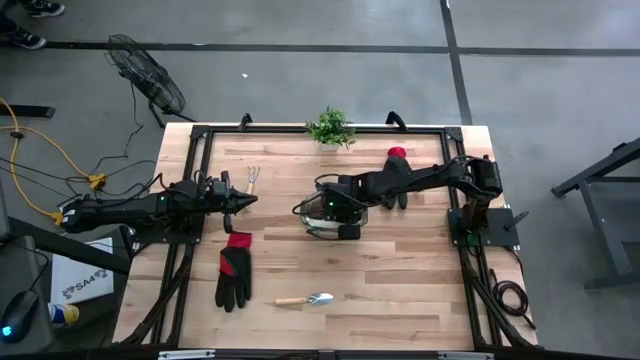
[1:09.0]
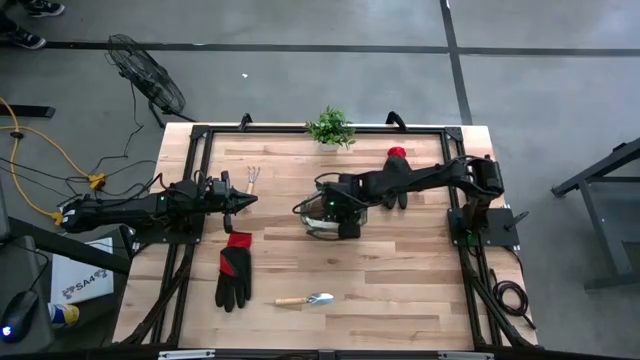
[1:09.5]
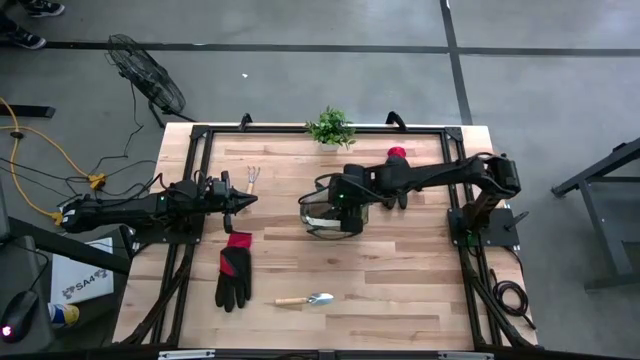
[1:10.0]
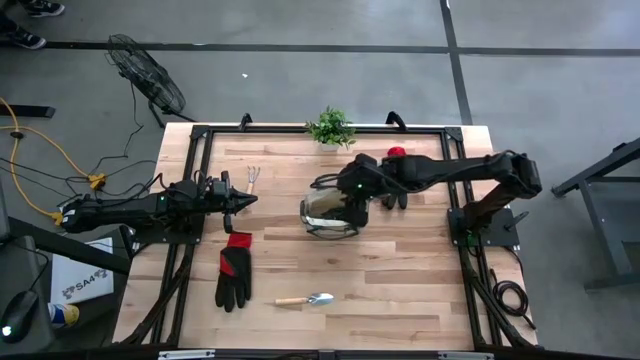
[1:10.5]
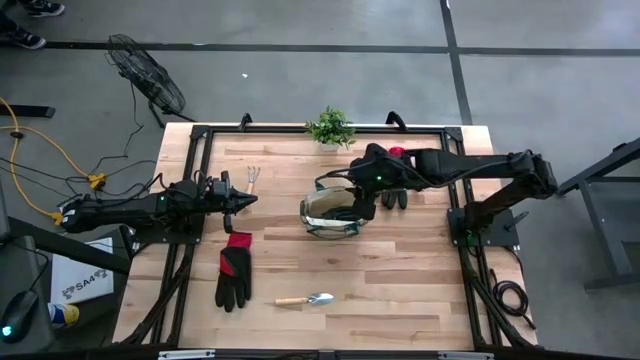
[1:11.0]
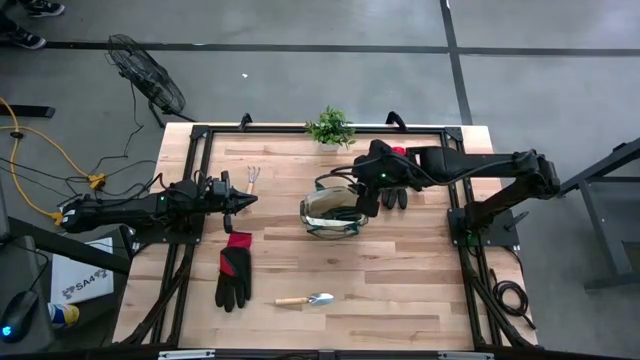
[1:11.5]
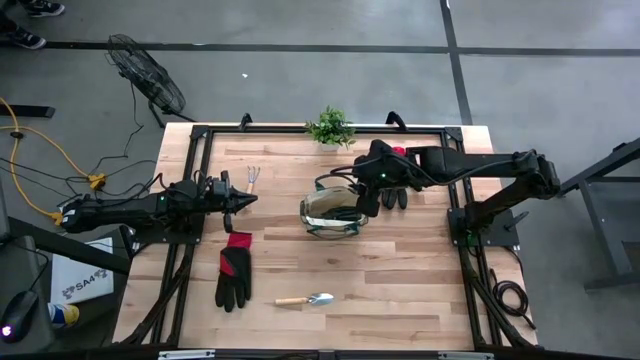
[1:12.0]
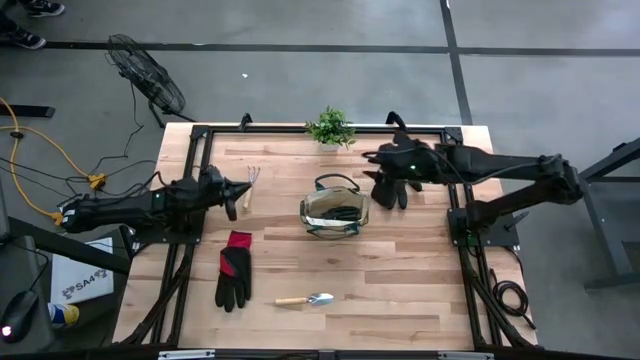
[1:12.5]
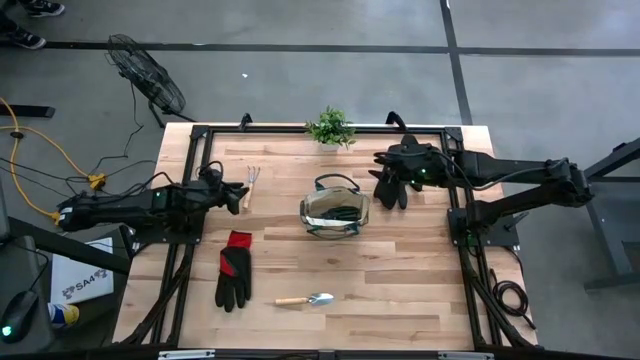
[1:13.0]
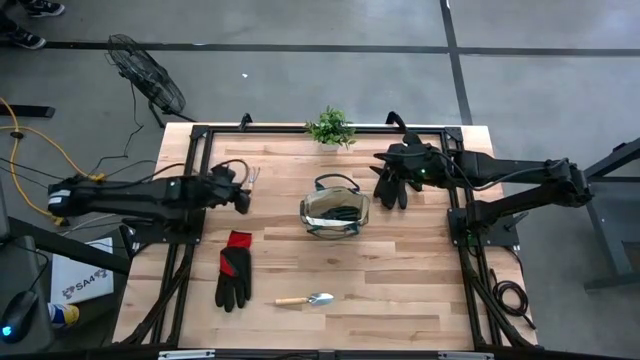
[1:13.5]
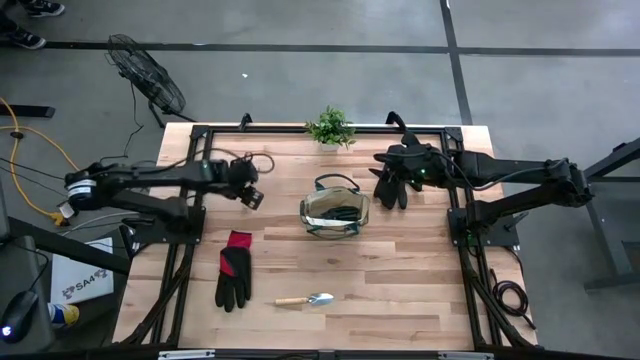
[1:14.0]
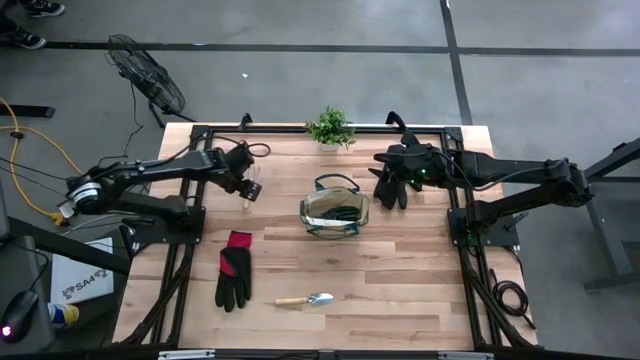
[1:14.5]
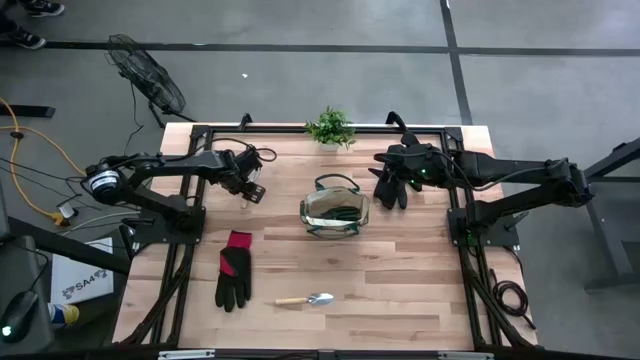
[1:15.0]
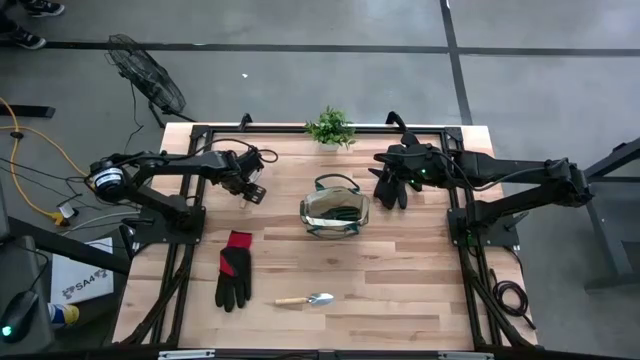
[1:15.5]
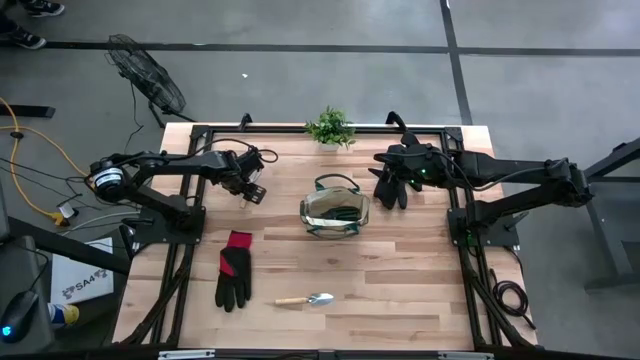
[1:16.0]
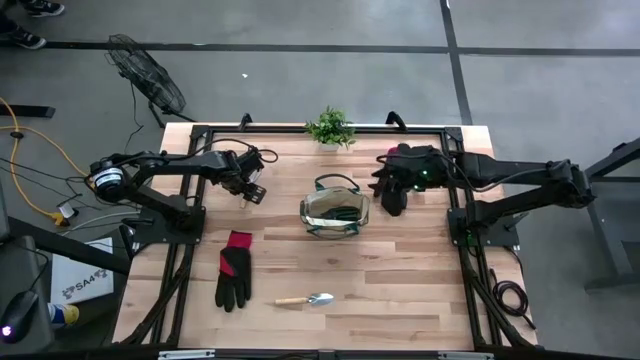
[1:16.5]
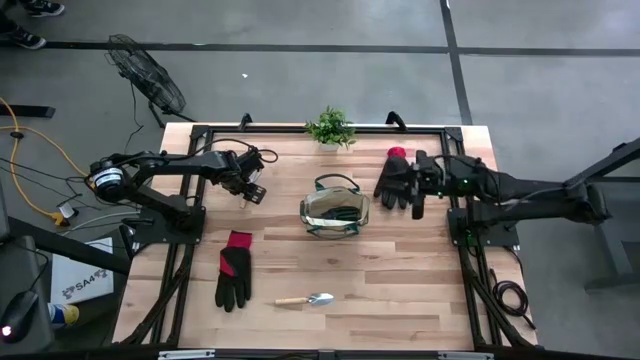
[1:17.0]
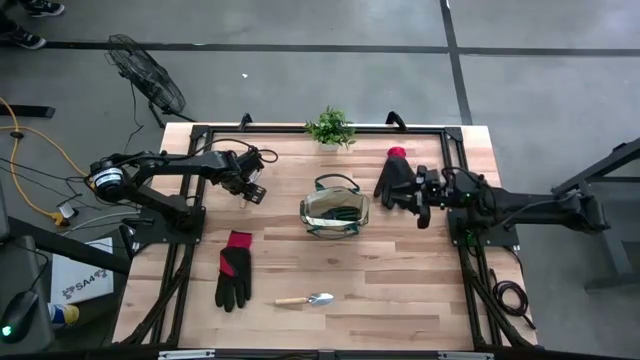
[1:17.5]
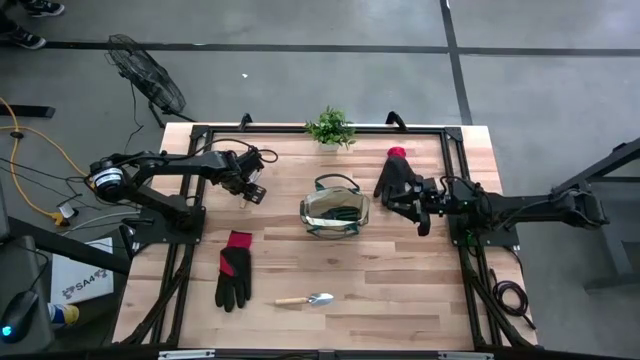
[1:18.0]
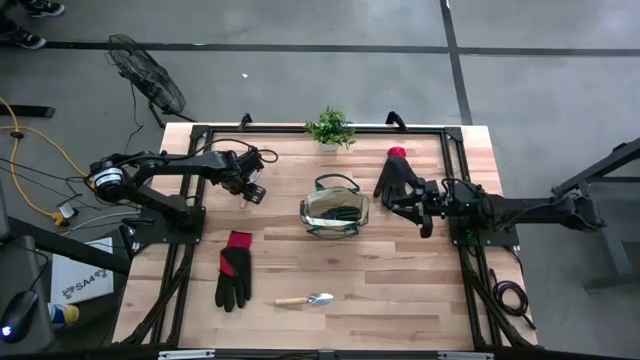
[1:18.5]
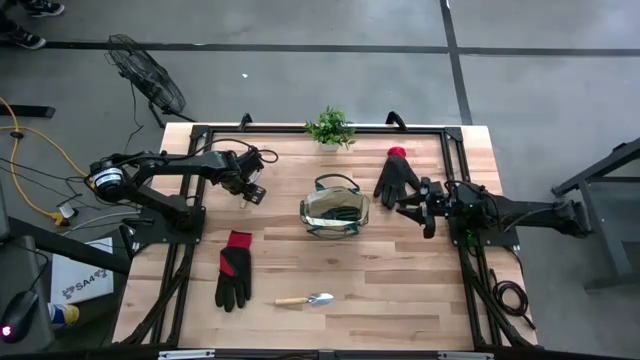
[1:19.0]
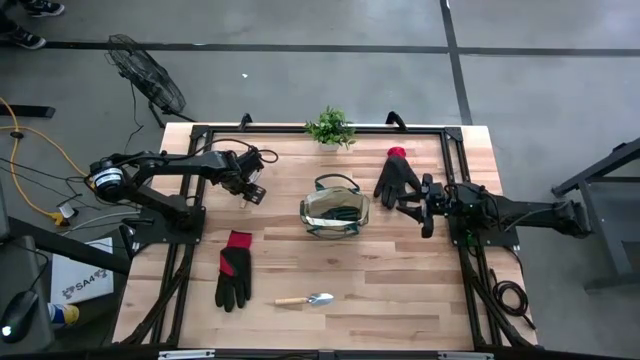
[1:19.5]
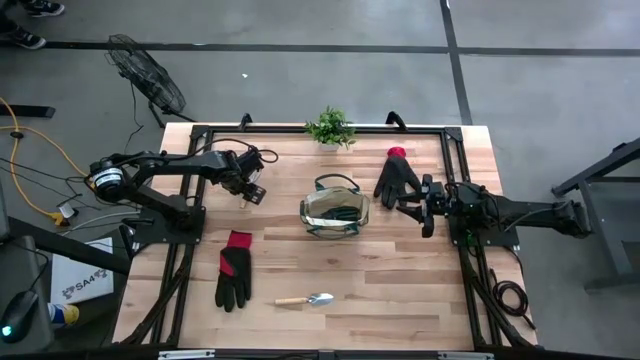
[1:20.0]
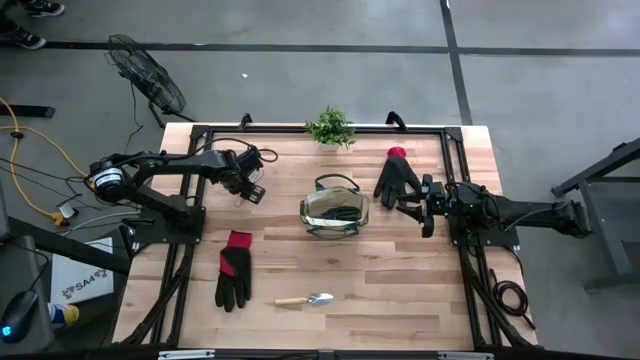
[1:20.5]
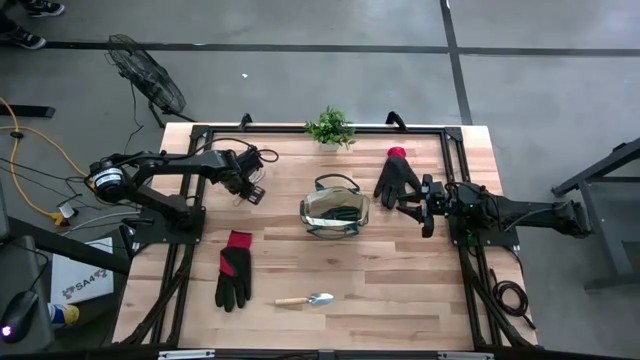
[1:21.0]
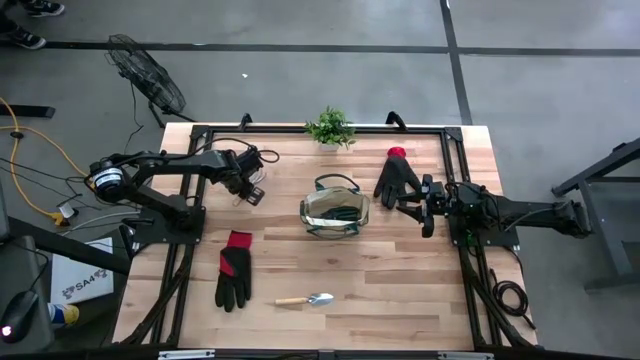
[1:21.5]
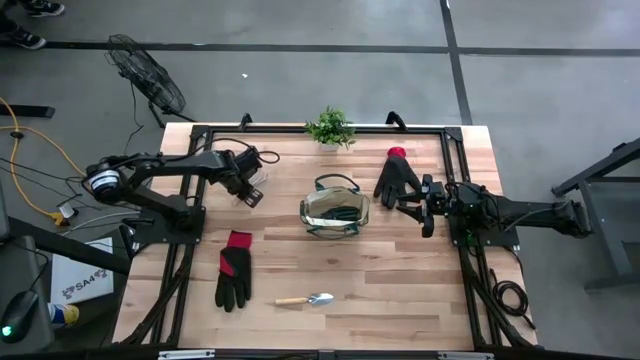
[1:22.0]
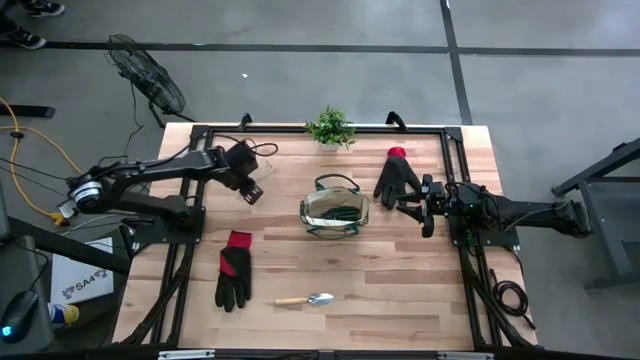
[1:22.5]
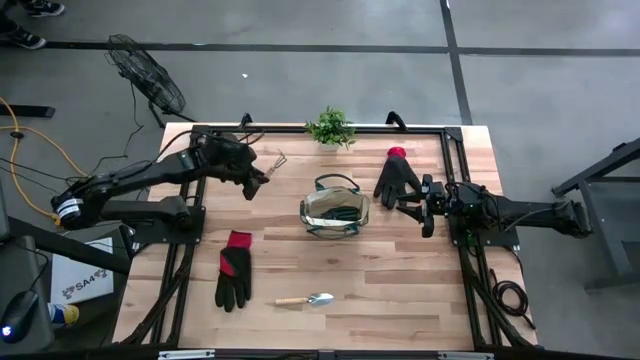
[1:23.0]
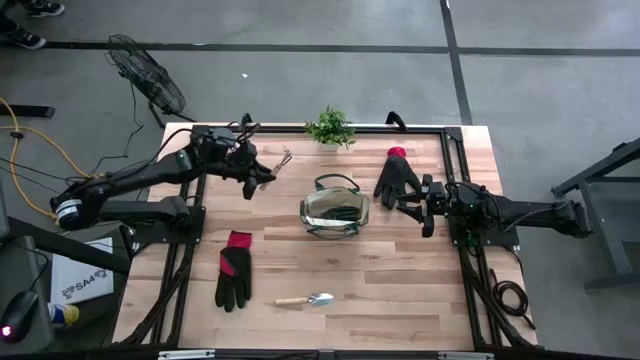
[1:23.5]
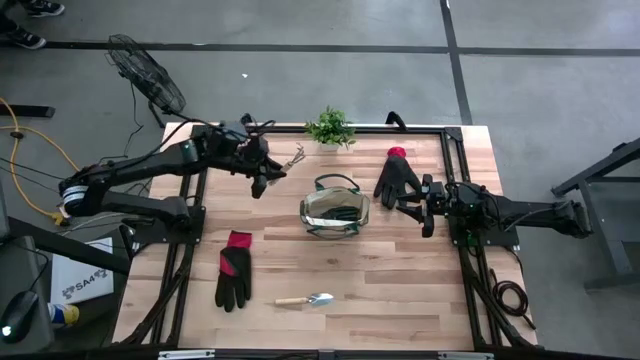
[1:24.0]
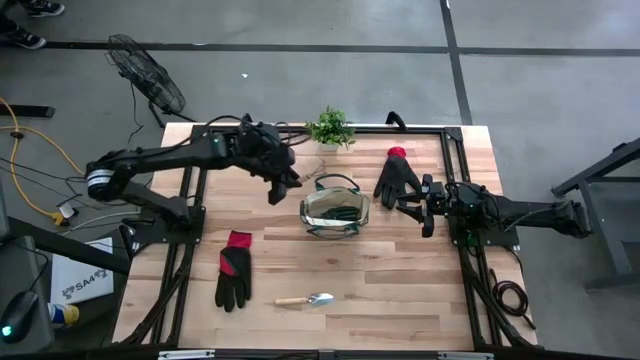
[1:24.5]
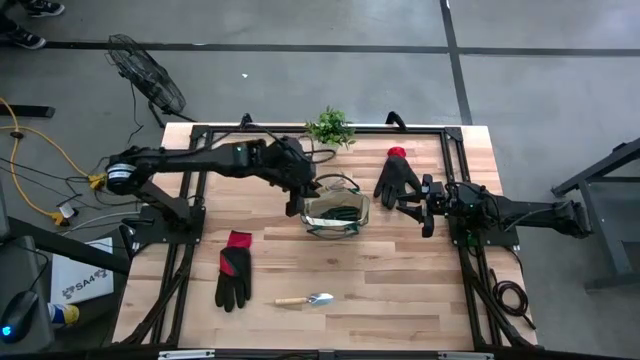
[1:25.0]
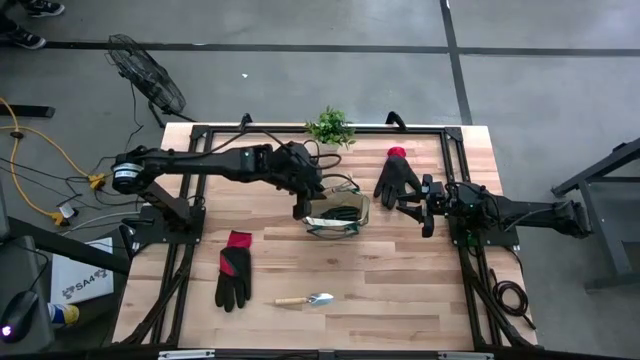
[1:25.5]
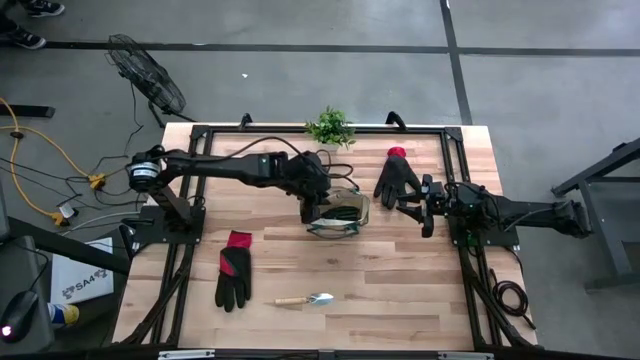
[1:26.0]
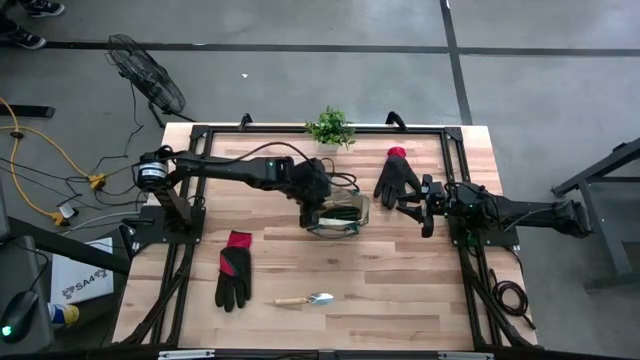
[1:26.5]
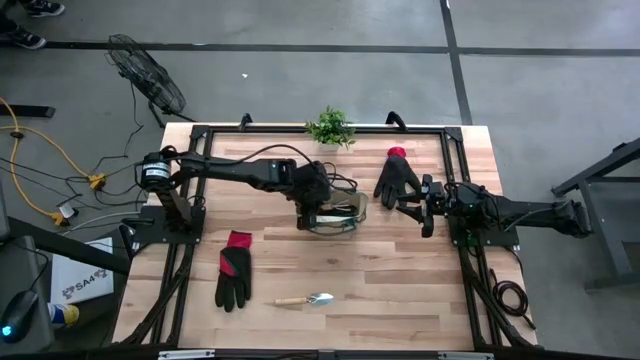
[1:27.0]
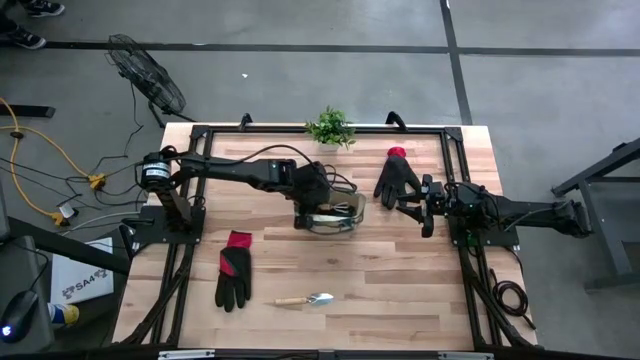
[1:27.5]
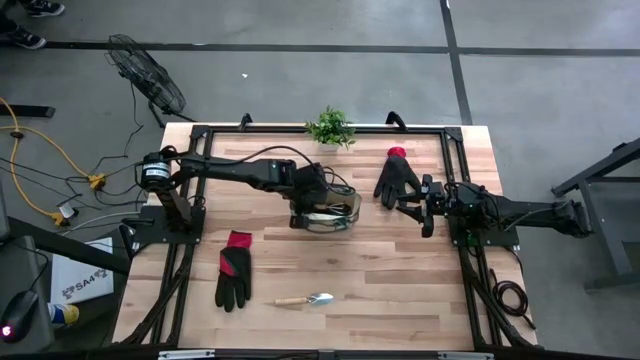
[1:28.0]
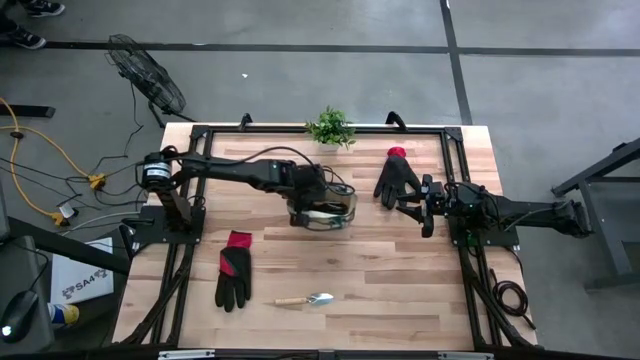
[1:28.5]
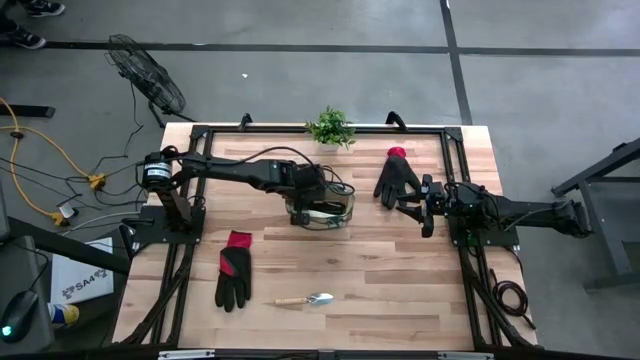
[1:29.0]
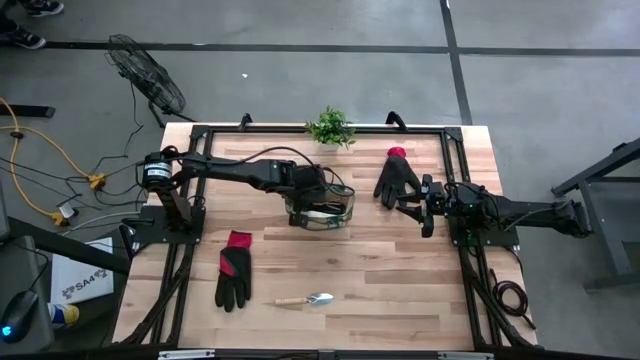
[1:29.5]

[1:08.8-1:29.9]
Task: Pick & Place Garden tools in Gardening bag
Put the brown hand rake into the gardening bag
